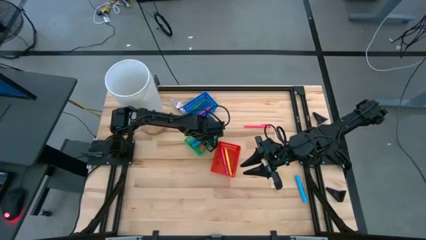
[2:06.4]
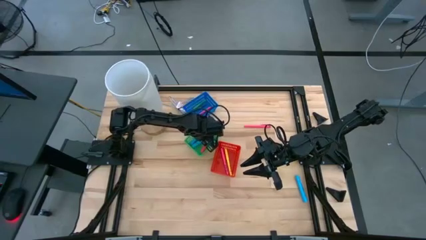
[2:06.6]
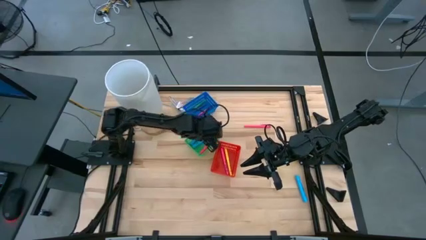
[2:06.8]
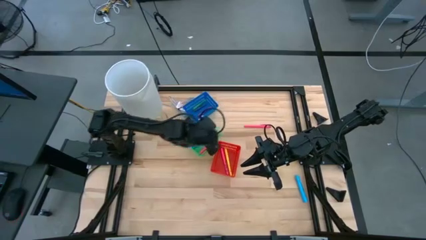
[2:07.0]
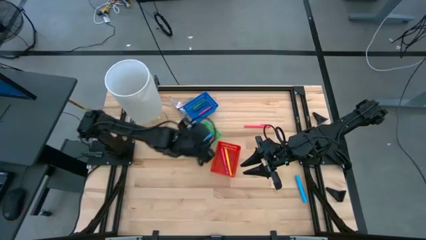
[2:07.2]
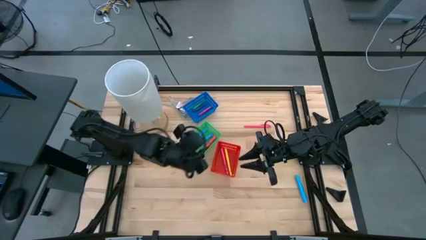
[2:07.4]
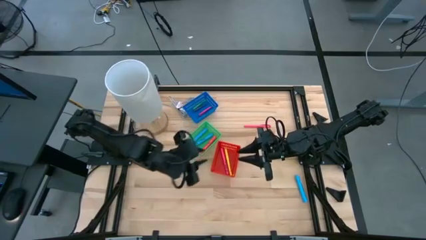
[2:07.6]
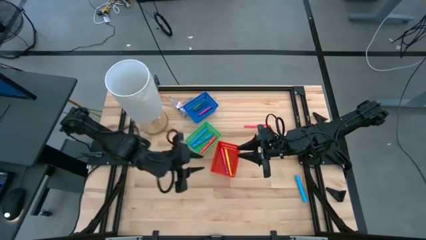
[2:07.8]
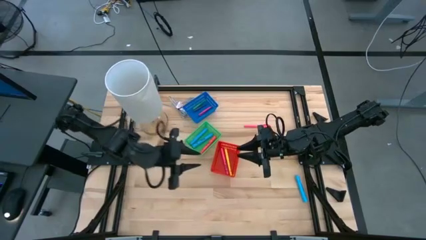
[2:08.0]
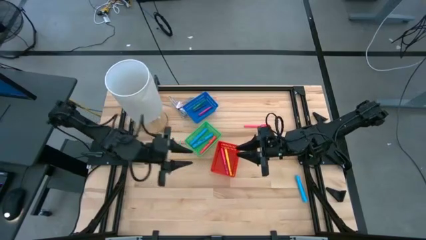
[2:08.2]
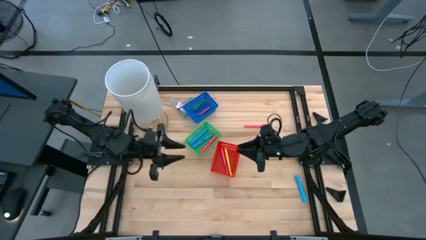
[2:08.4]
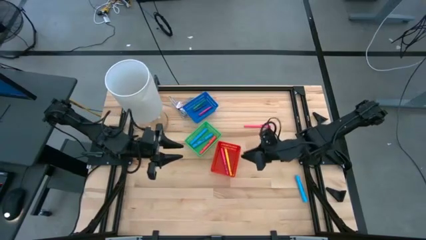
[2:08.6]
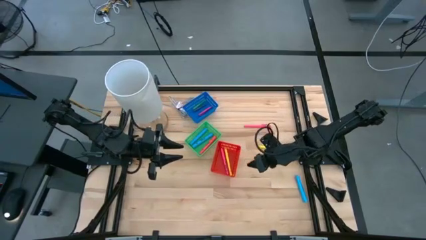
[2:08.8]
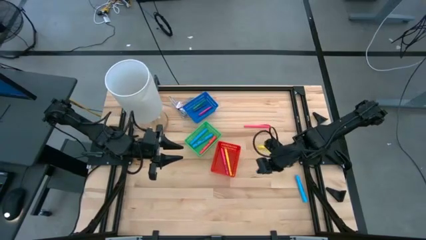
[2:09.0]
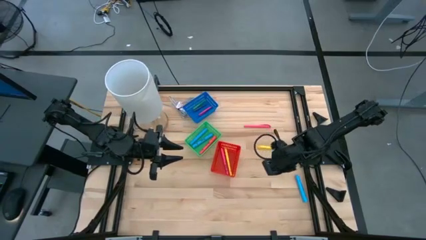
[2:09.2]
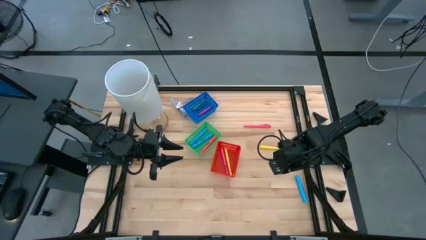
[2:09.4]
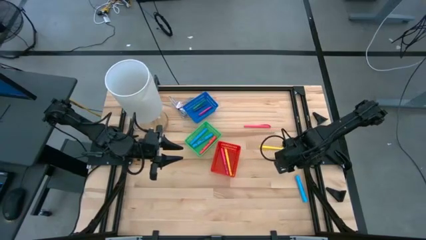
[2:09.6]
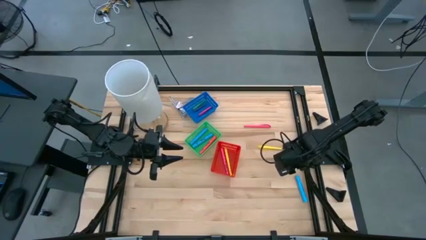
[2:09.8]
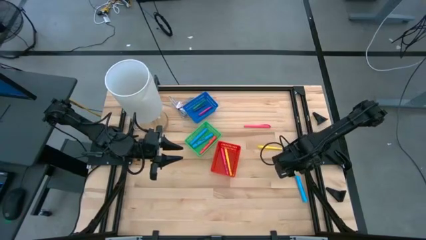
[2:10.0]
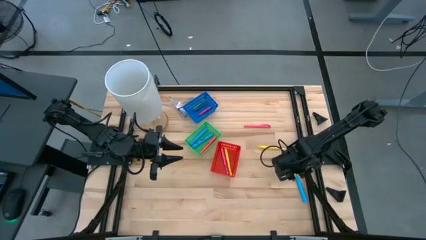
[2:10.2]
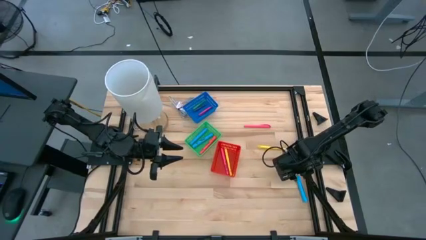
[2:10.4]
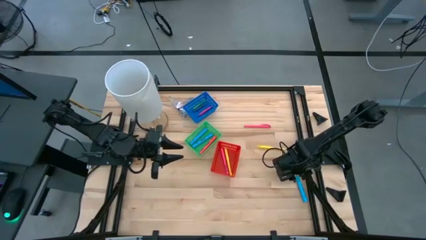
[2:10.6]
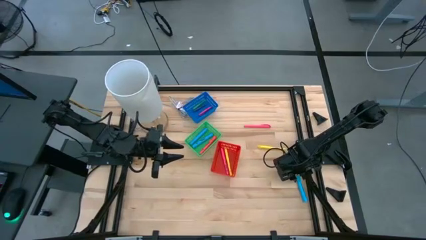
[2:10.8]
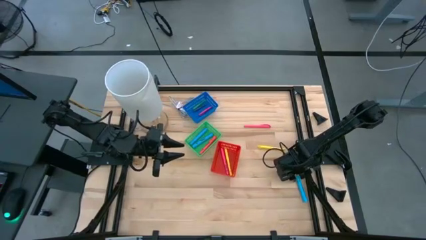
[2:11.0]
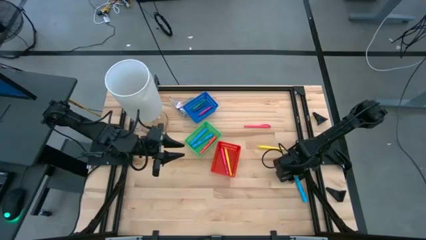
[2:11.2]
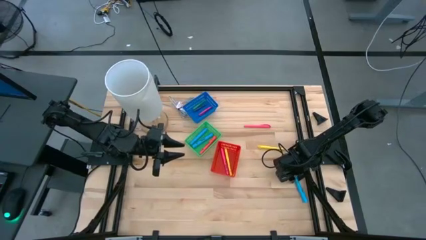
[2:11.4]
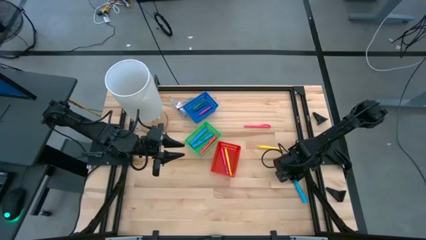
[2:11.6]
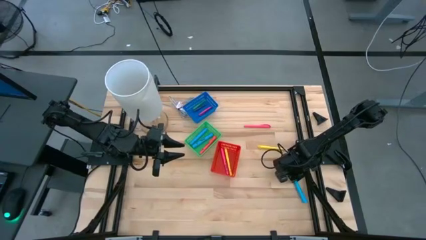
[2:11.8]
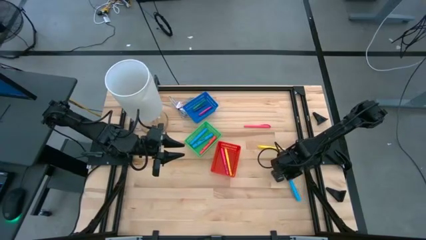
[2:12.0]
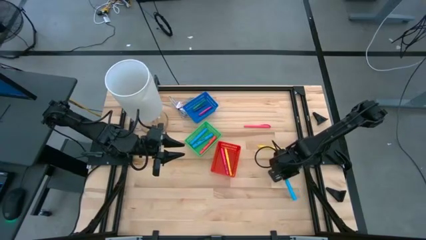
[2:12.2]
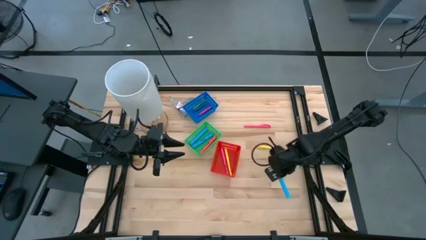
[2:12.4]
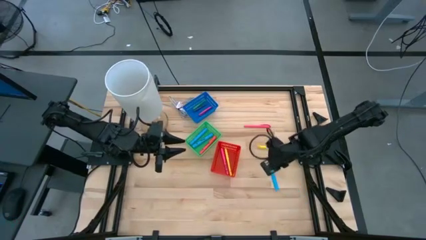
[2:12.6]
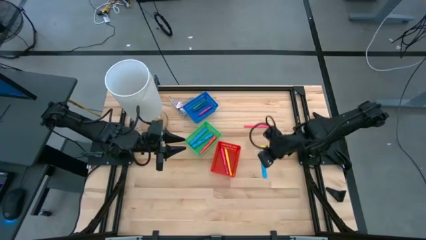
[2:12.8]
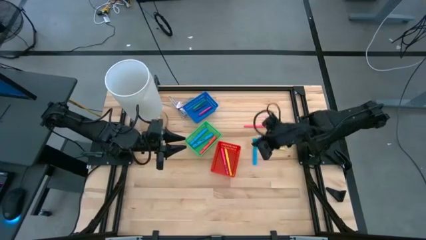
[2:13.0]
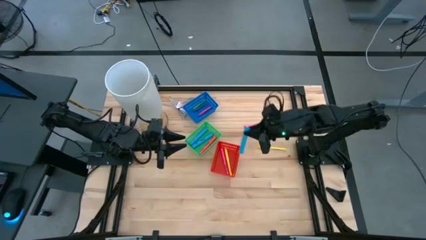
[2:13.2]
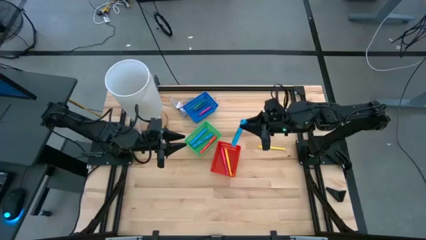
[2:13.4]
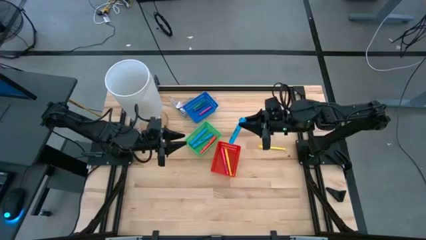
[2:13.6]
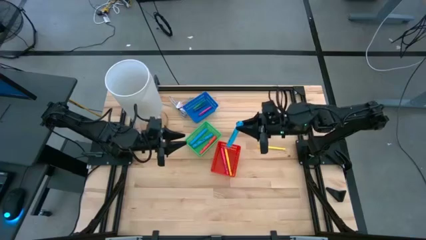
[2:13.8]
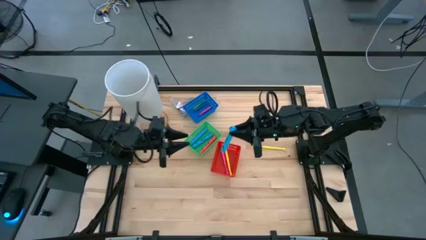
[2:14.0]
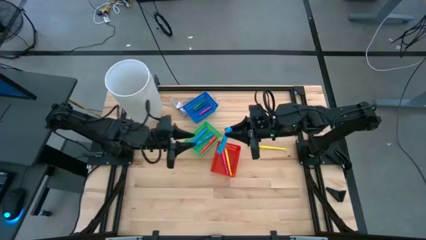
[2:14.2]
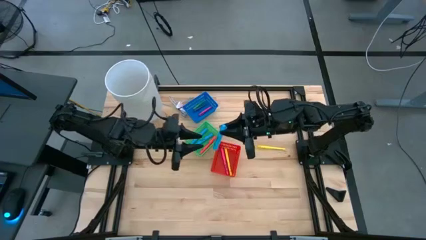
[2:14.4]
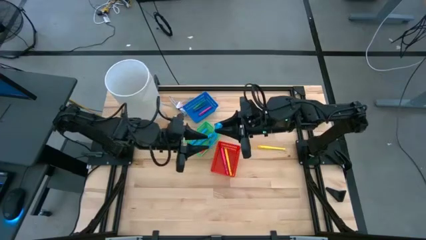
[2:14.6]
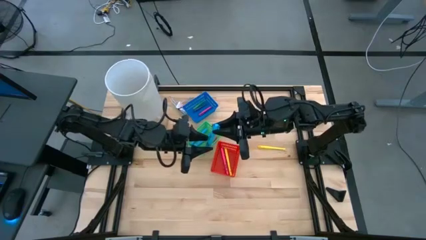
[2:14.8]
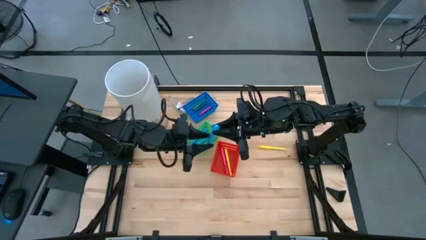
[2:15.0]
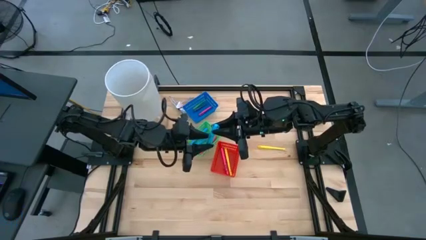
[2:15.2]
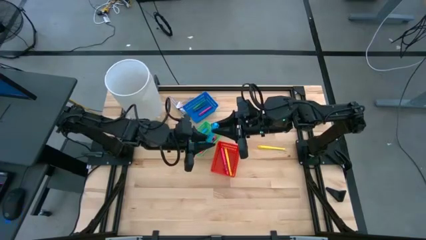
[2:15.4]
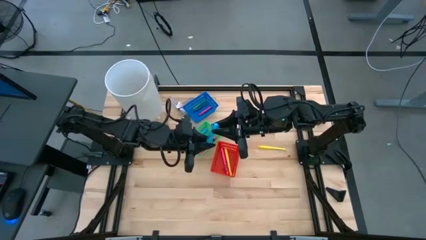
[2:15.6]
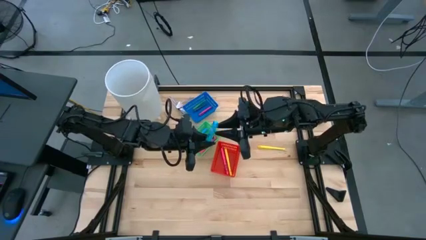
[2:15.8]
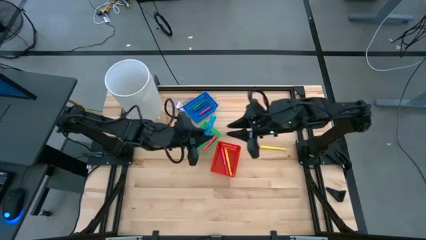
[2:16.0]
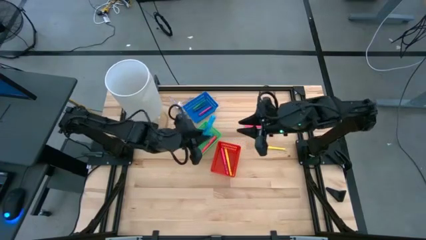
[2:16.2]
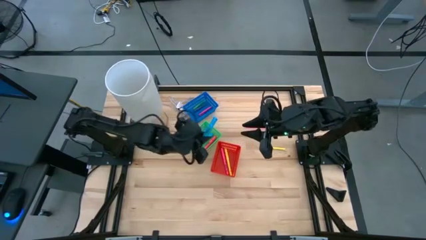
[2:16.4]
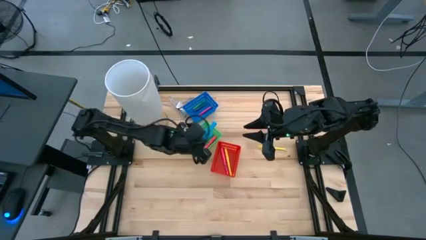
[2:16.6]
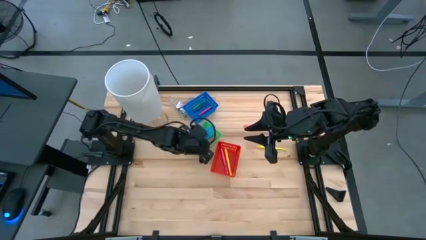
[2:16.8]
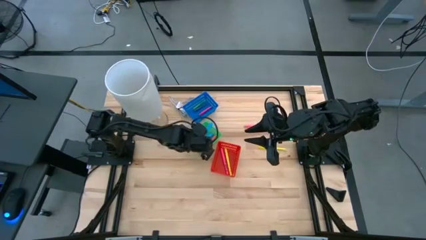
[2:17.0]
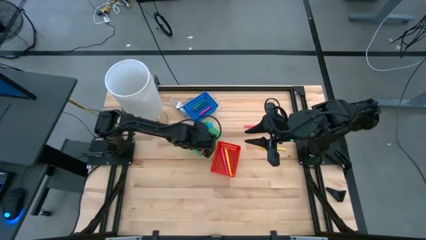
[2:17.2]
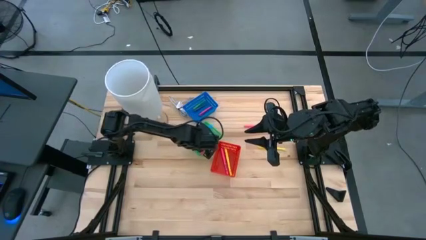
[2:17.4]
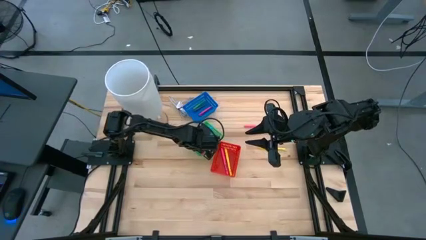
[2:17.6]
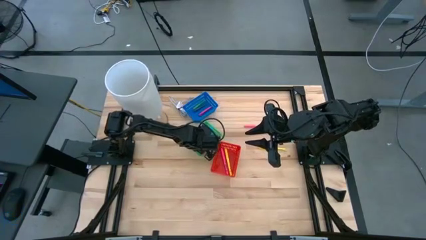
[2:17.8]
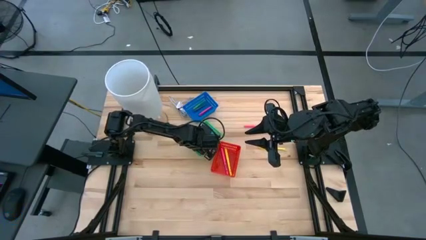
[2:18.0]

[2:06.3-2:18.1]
Task: Pick & Place Markers
Put the blue highlighter pen into the green bin
